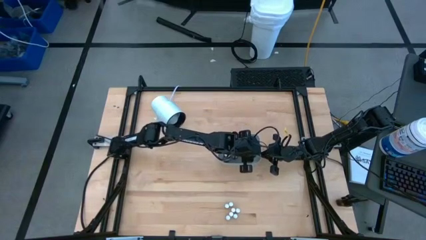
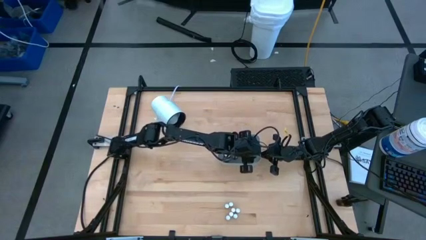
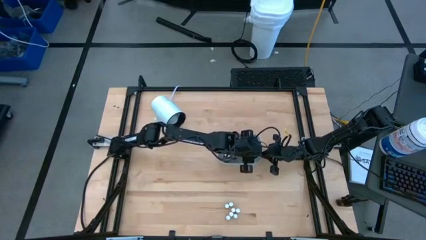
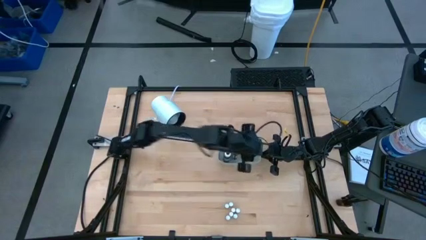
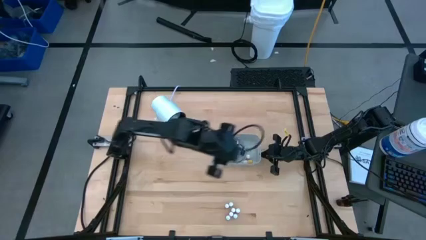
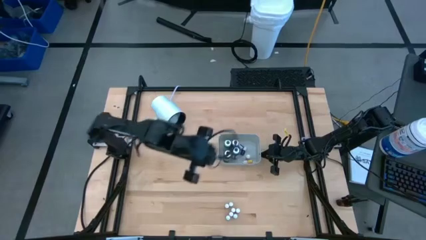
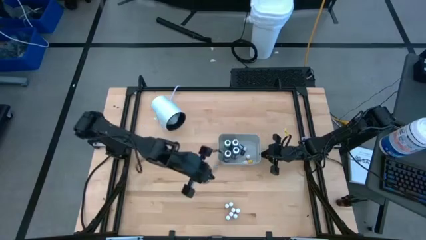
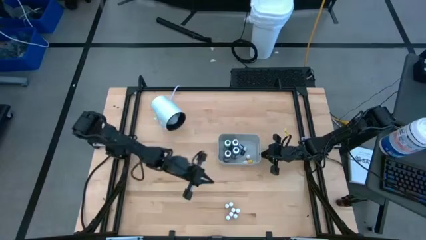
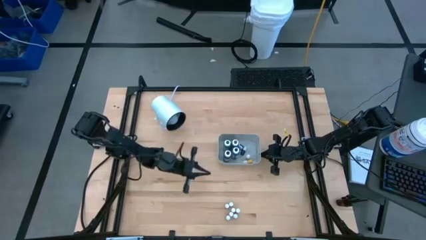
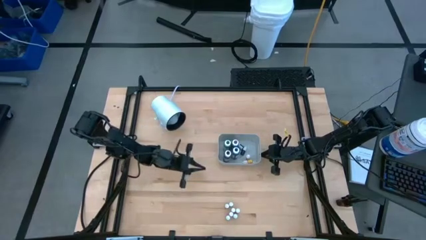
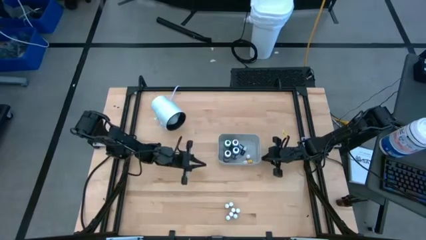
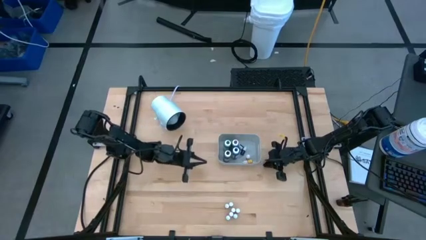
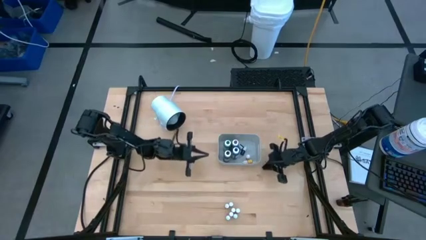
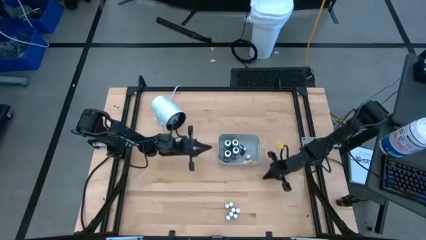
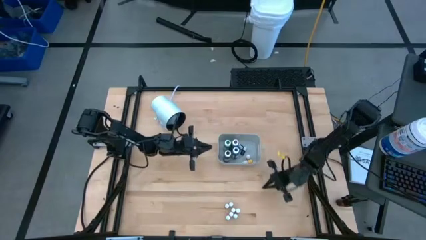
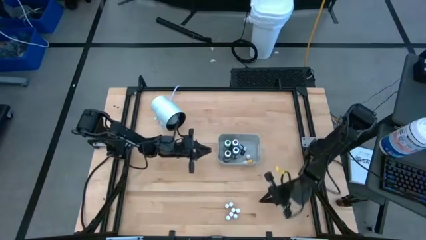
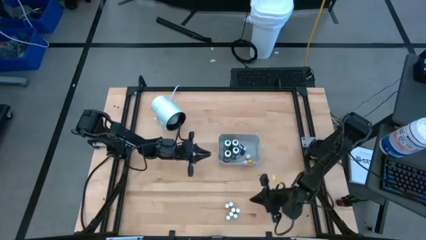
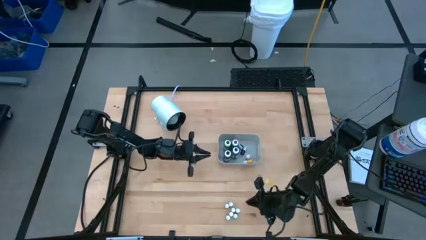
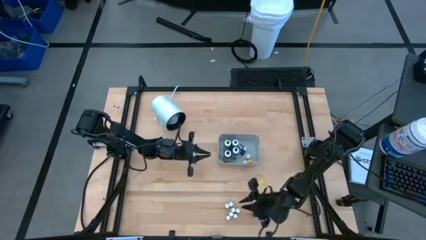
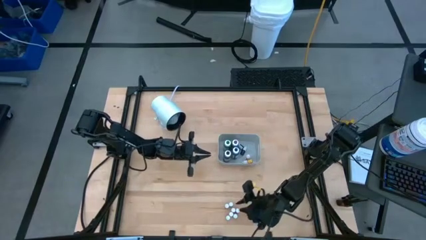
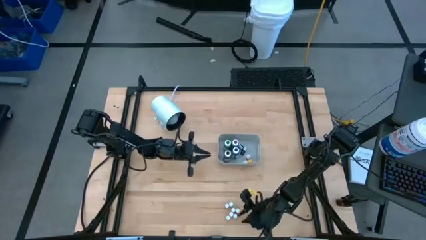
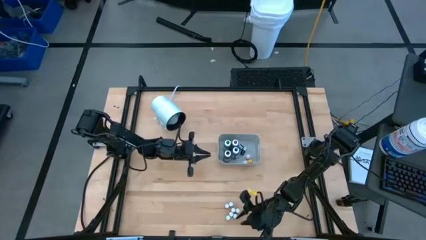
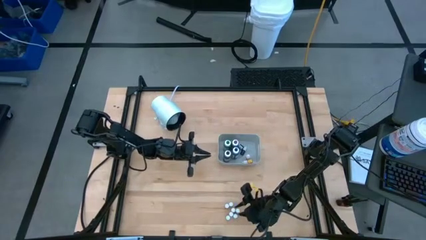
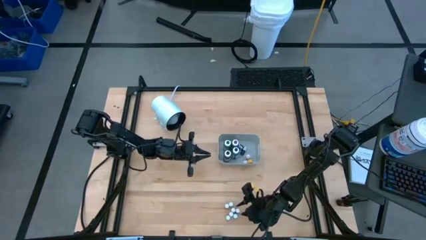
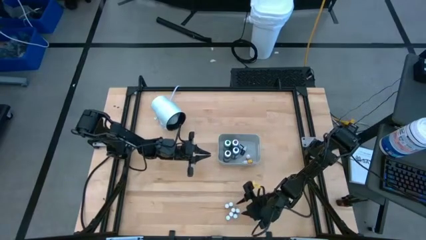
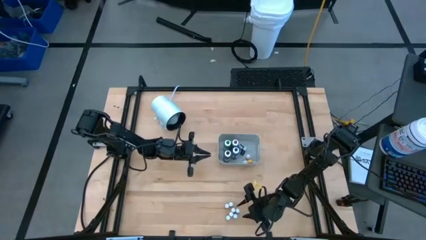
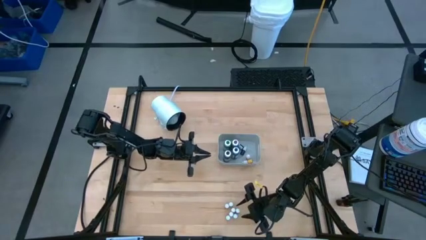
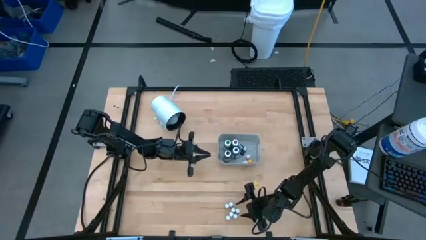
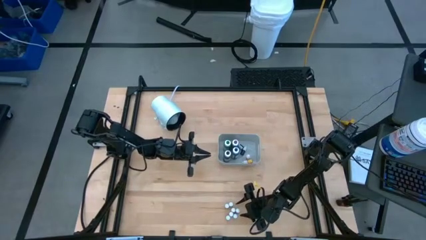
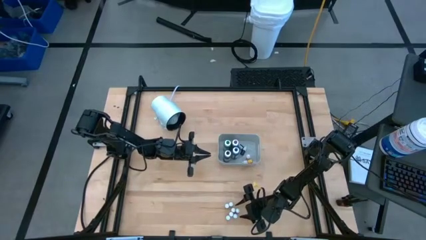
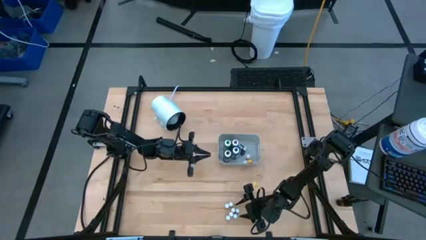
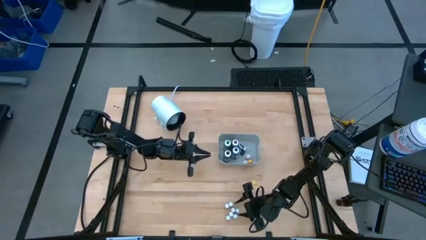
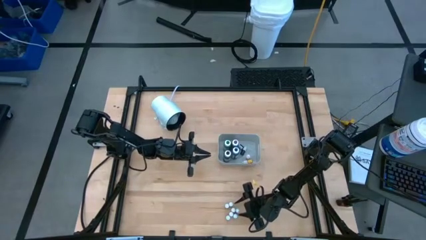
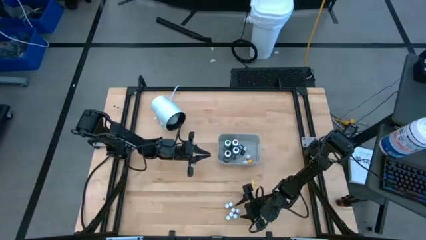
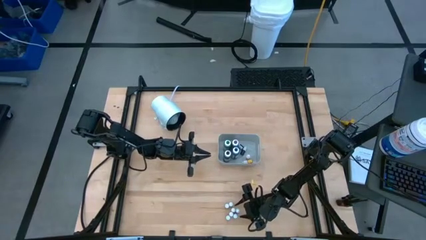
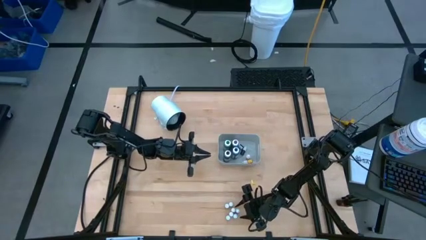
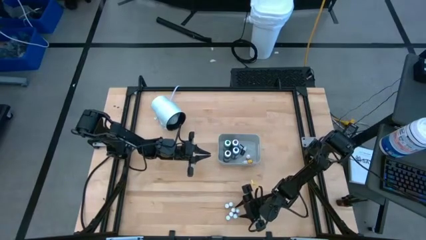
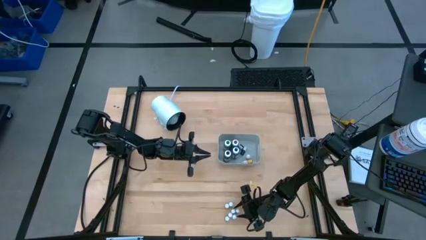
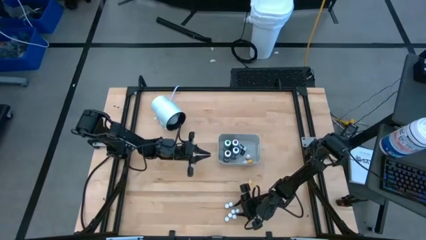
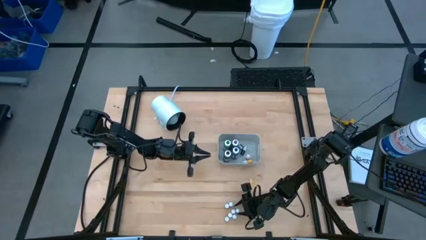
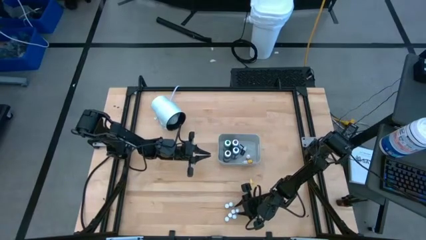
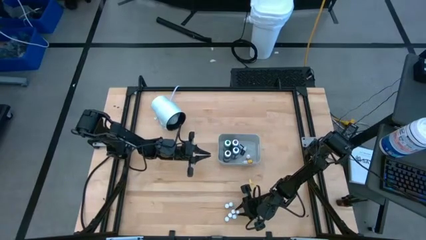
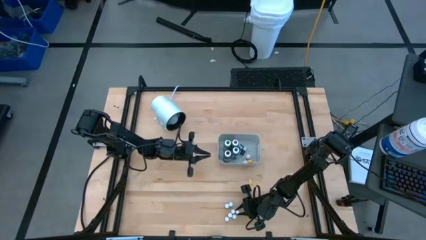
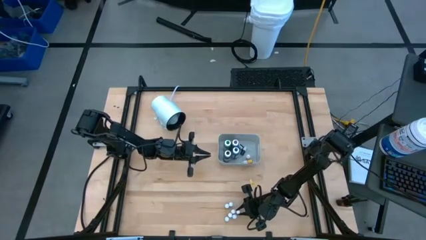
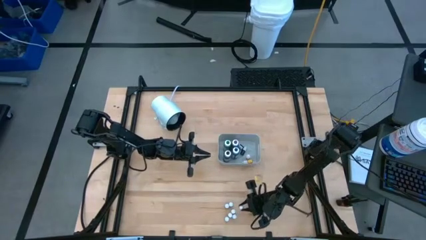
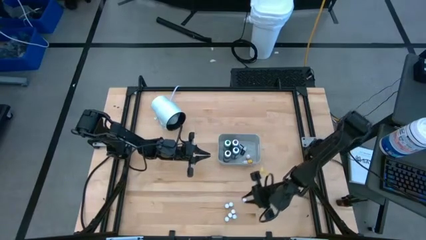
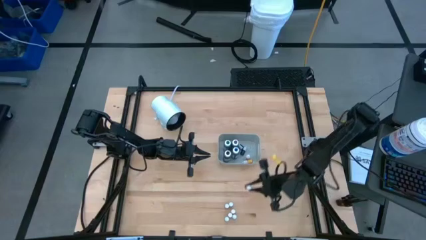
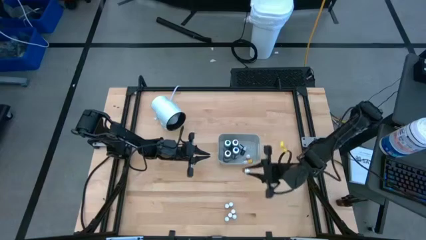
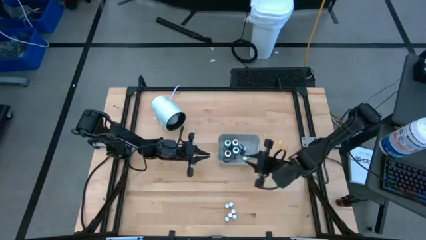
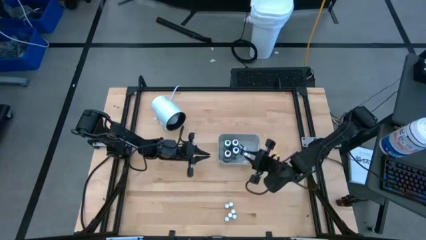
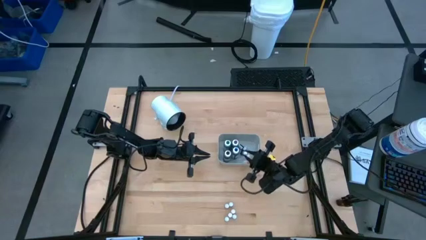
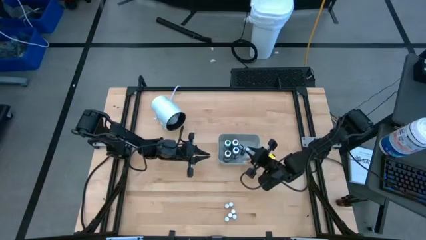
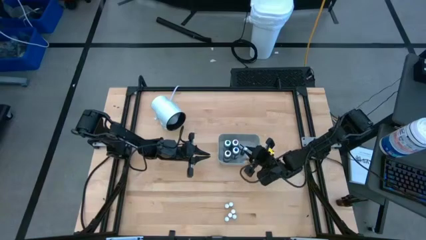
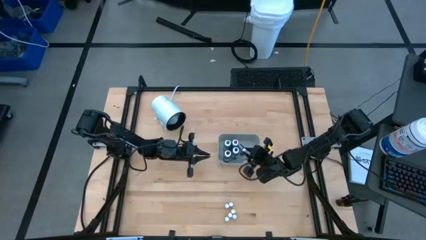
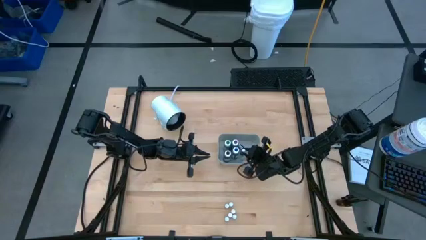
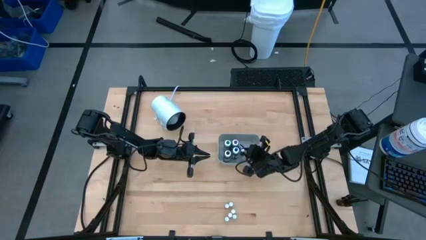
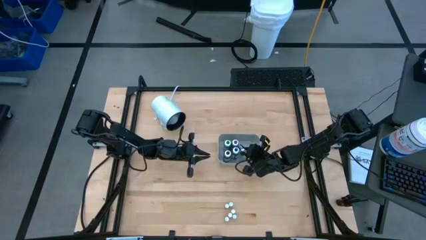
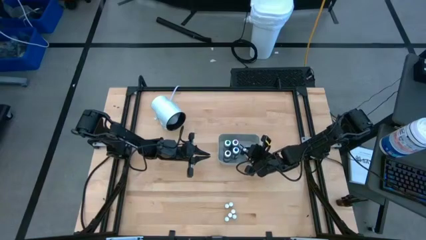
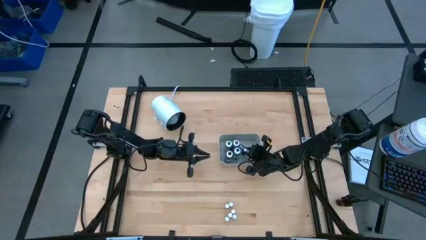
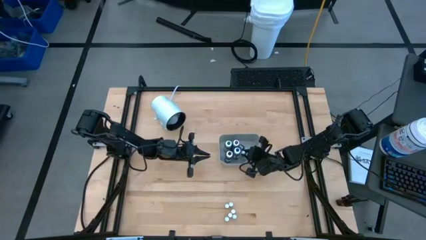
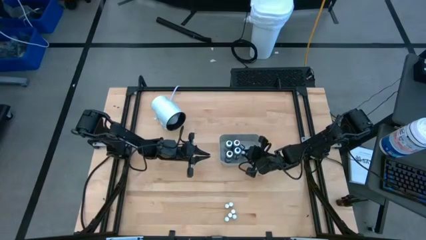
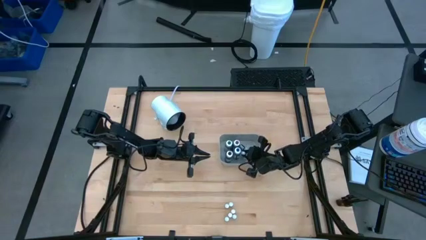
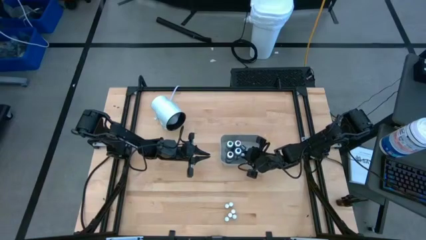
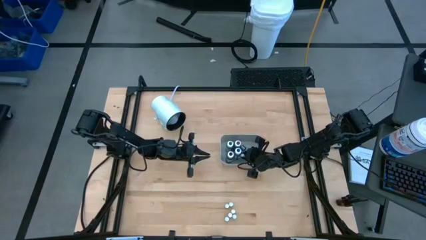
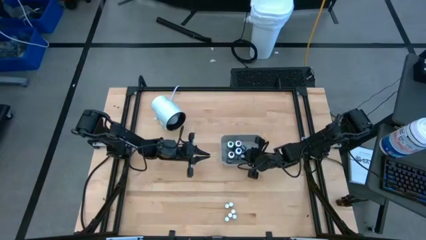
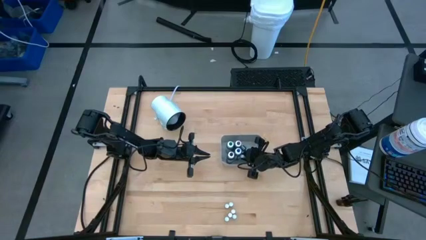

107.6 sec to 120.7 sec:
Task: Pick & Place food coloring
Put the small red food coloring bottle into the gray bin

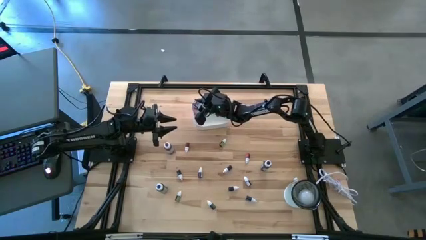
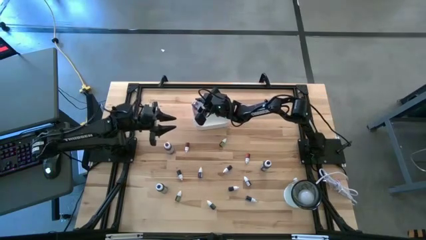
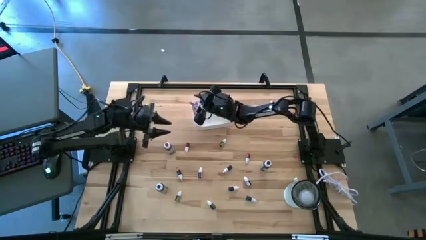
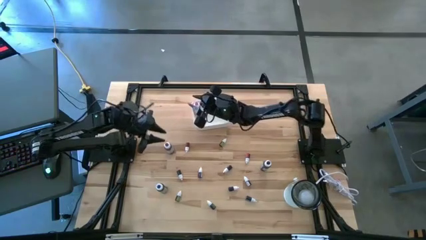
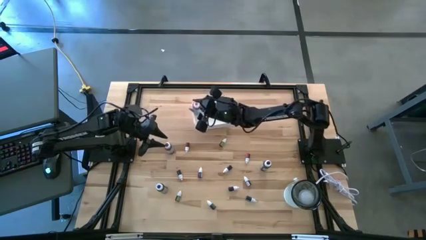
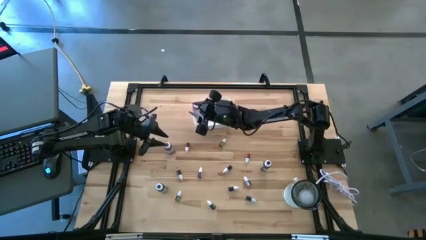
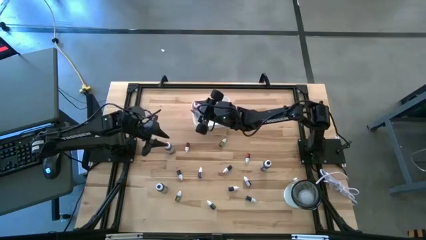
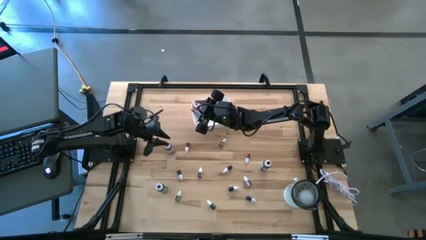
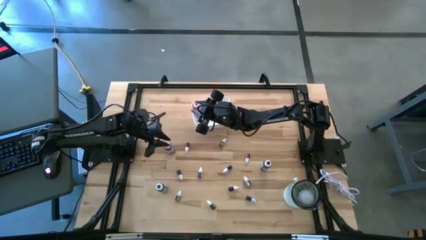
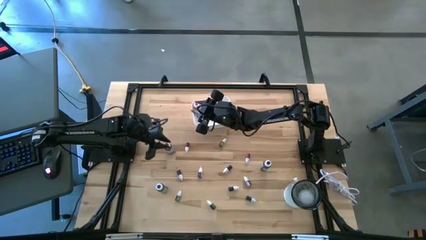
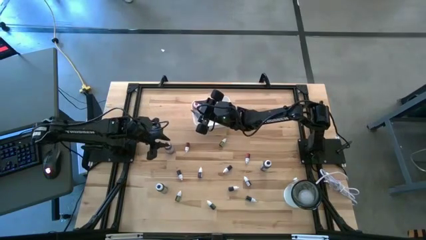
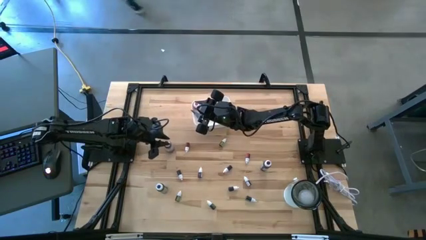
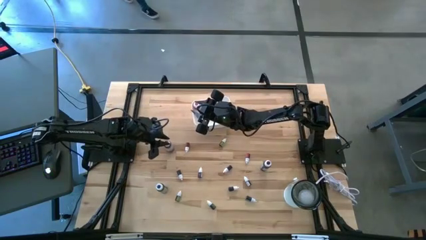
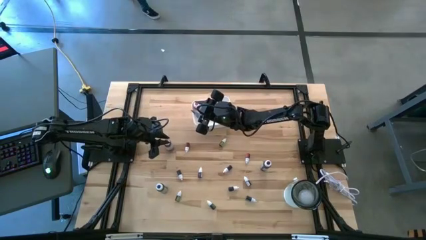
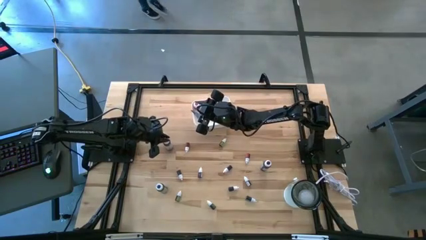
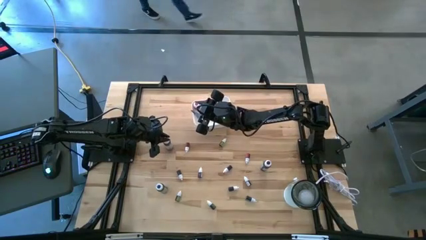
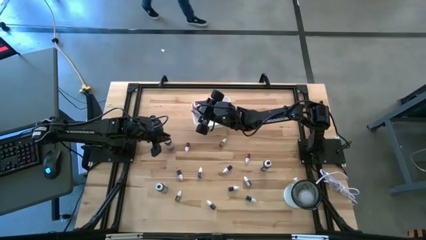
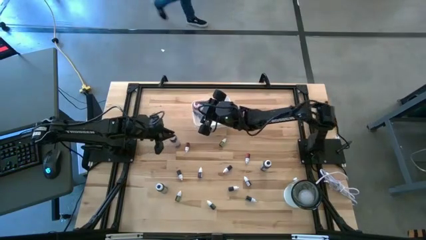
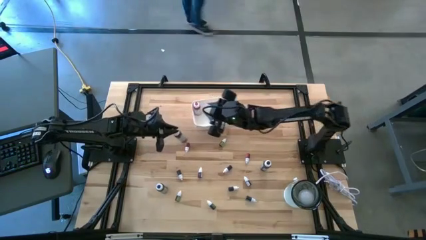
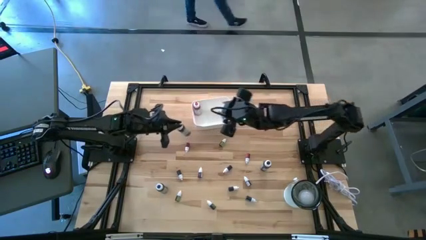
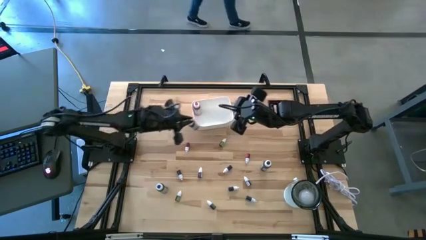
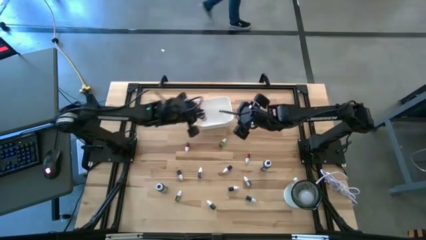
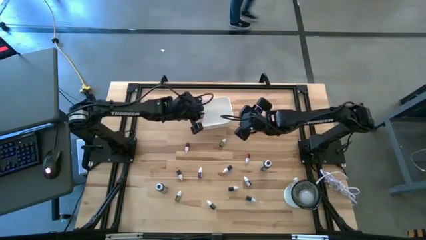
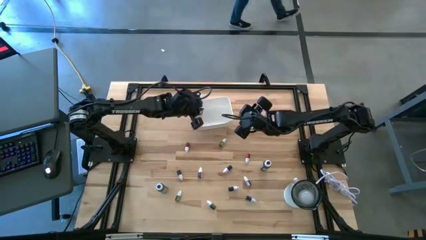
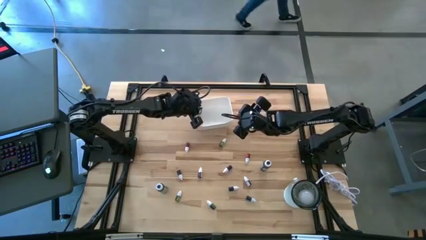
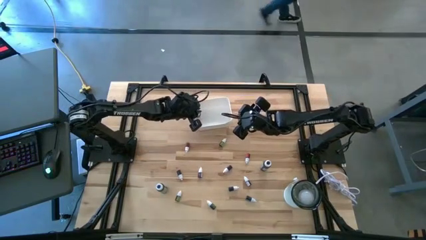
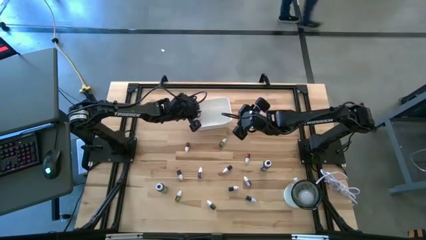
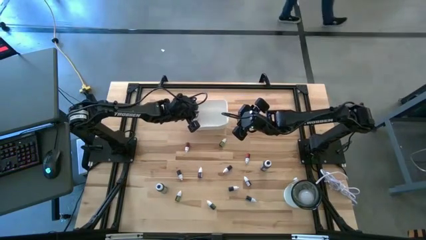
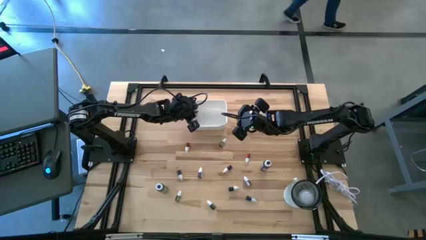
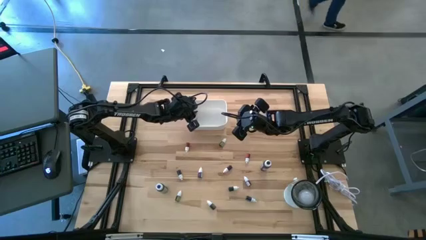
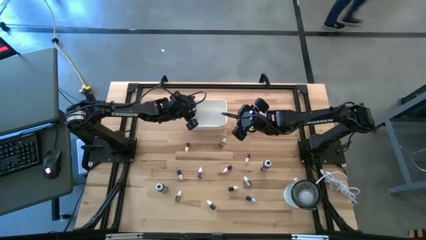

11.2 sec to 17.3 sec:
Task: Pick & Place food coloring
Put the large purple food coloring bottle into the white bin
